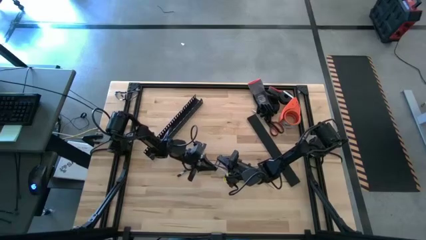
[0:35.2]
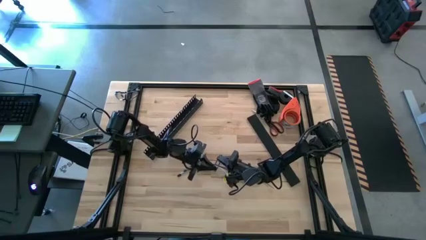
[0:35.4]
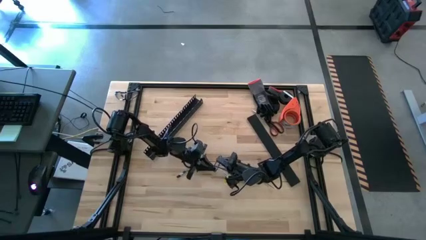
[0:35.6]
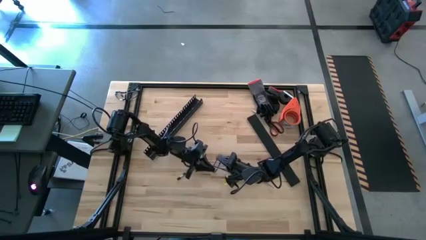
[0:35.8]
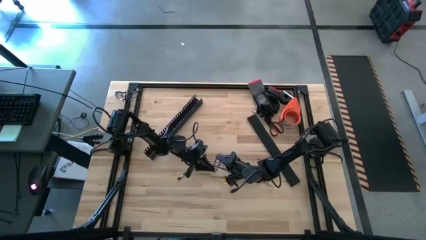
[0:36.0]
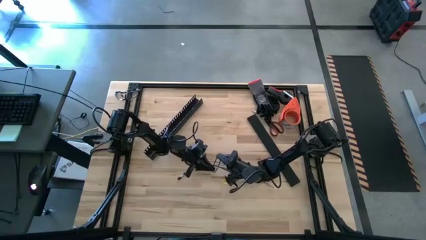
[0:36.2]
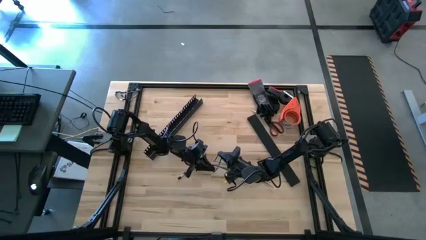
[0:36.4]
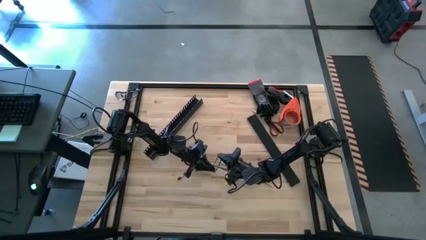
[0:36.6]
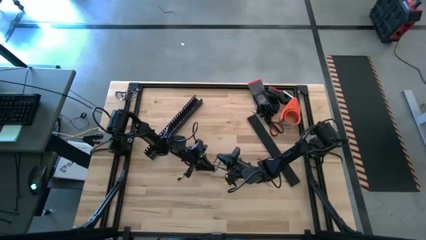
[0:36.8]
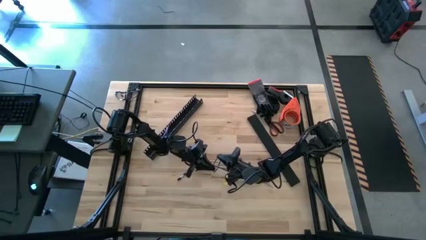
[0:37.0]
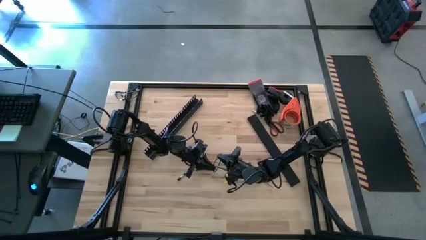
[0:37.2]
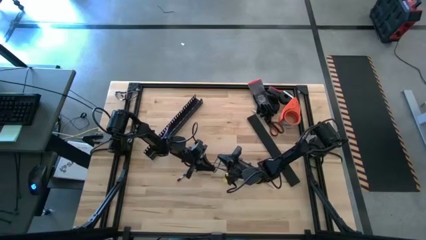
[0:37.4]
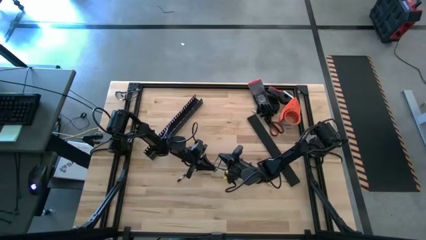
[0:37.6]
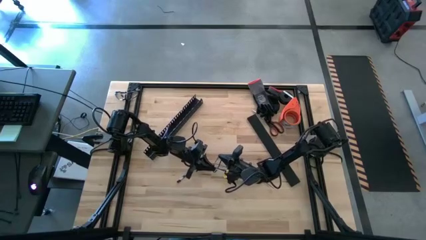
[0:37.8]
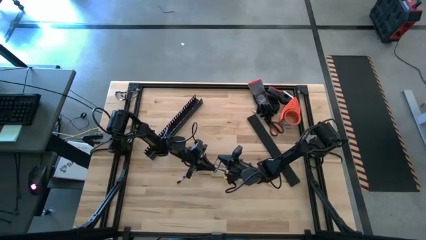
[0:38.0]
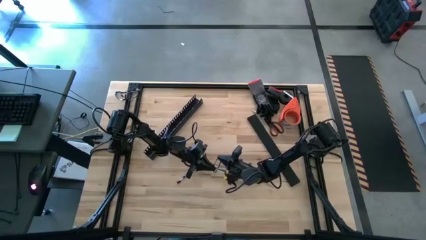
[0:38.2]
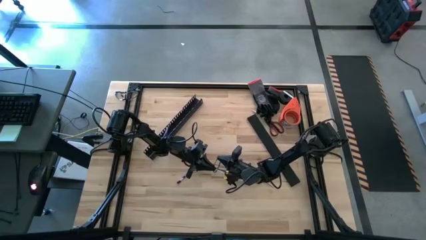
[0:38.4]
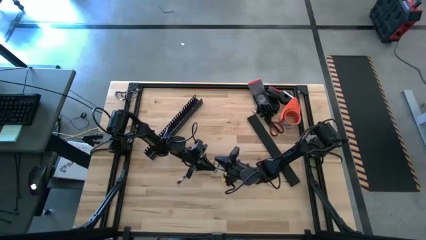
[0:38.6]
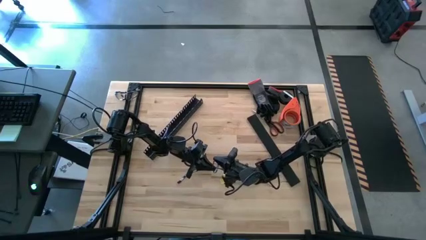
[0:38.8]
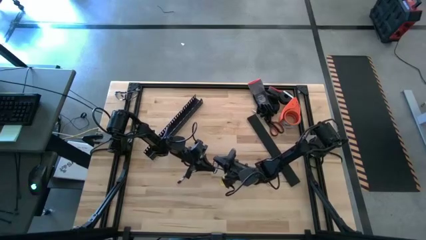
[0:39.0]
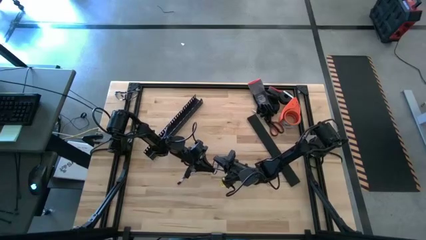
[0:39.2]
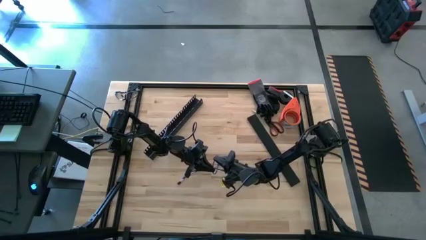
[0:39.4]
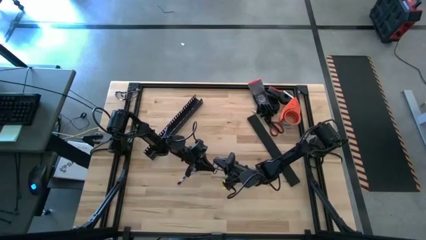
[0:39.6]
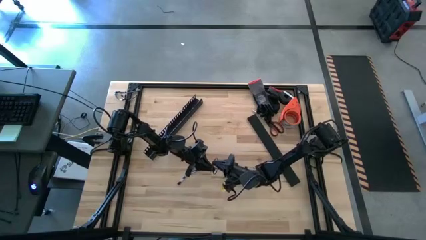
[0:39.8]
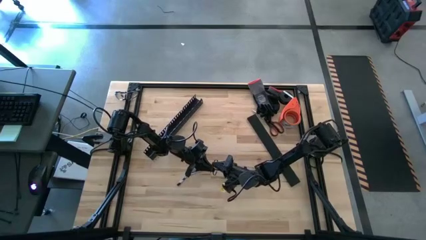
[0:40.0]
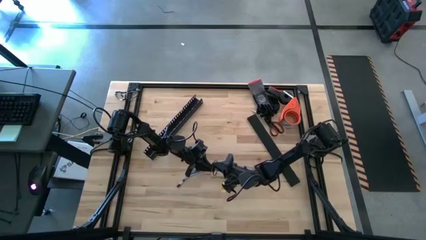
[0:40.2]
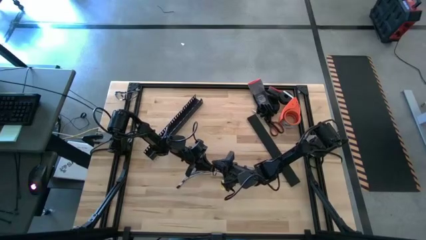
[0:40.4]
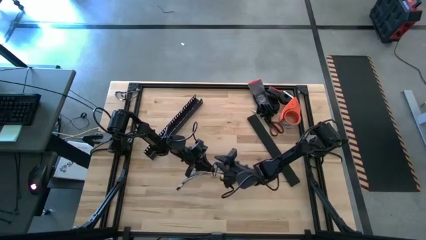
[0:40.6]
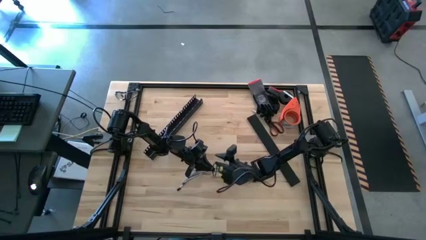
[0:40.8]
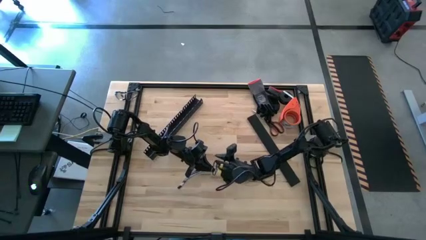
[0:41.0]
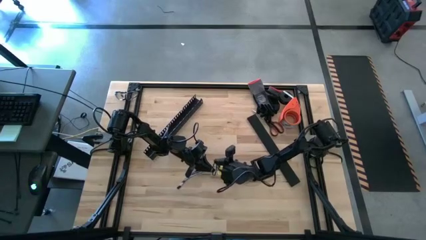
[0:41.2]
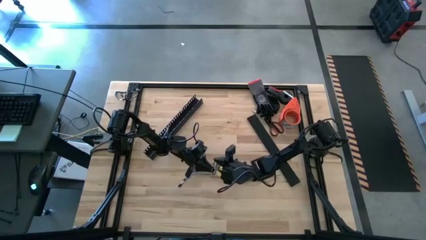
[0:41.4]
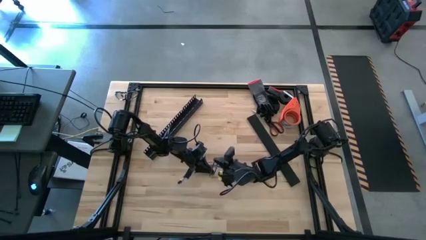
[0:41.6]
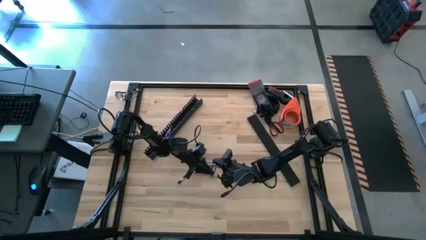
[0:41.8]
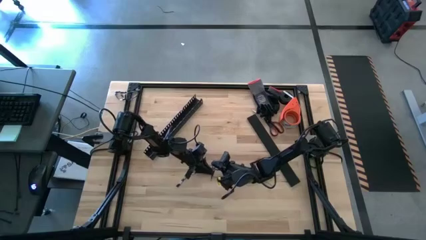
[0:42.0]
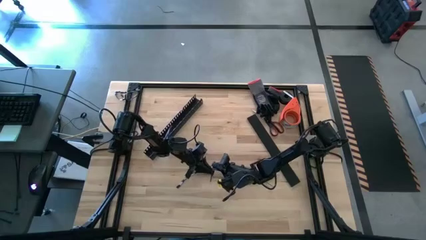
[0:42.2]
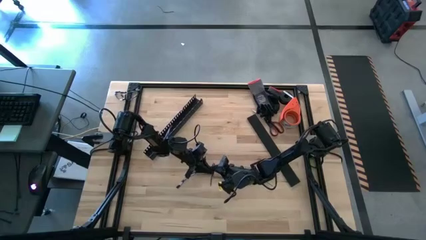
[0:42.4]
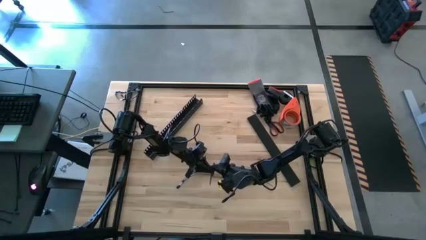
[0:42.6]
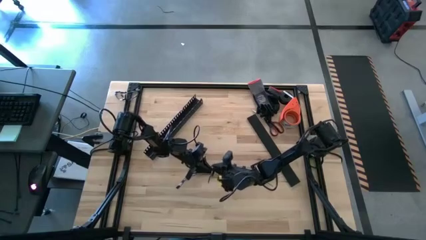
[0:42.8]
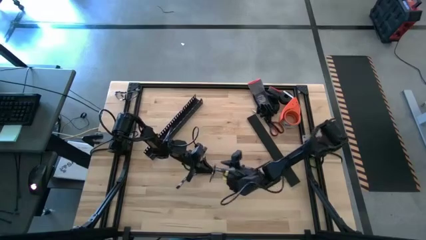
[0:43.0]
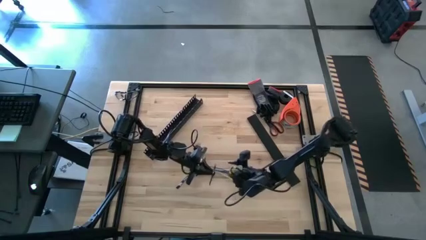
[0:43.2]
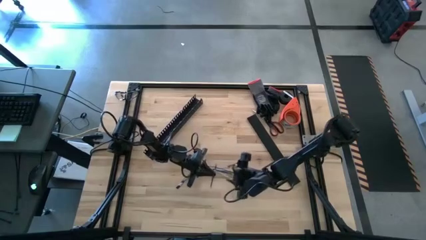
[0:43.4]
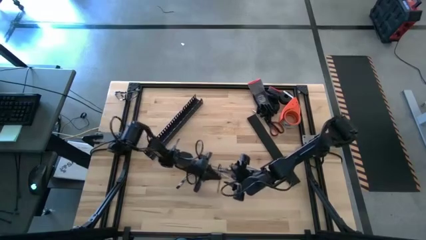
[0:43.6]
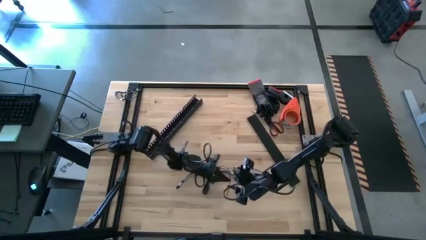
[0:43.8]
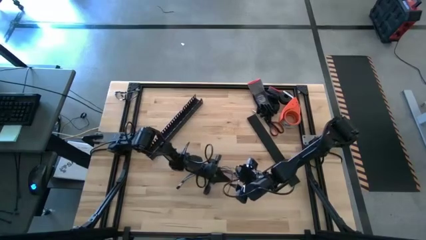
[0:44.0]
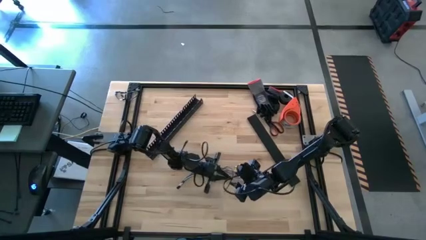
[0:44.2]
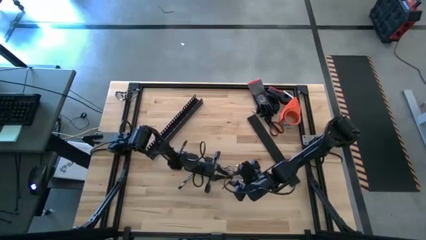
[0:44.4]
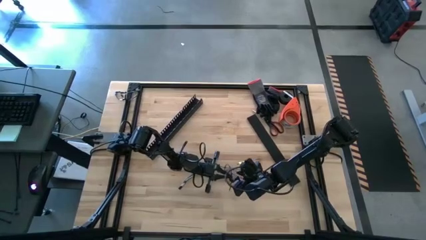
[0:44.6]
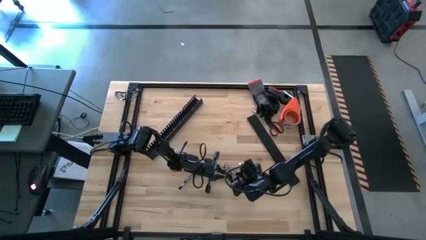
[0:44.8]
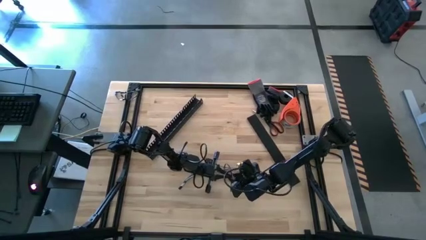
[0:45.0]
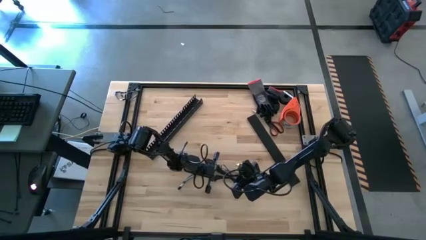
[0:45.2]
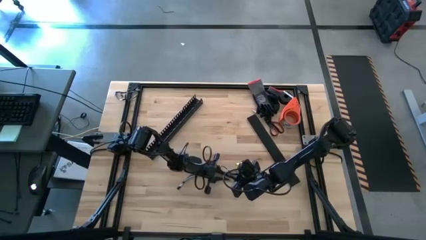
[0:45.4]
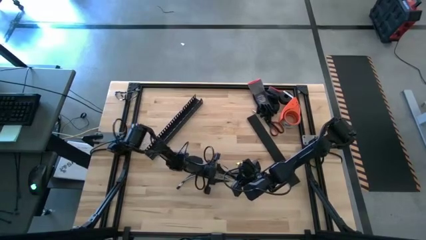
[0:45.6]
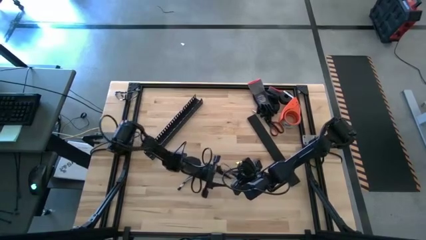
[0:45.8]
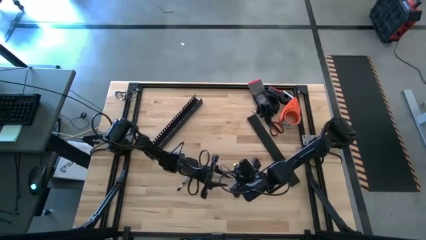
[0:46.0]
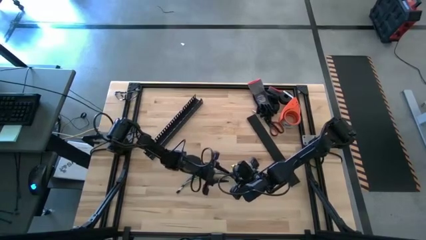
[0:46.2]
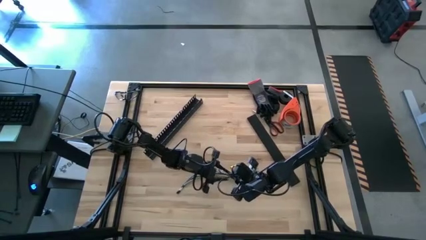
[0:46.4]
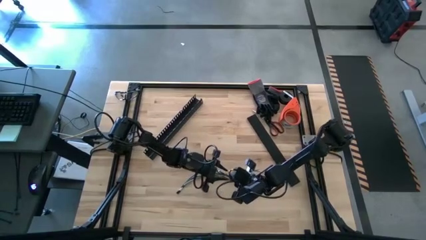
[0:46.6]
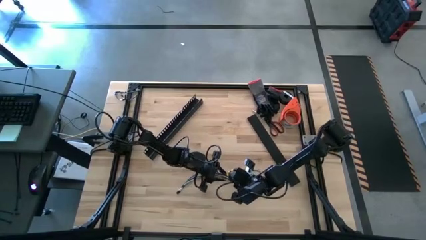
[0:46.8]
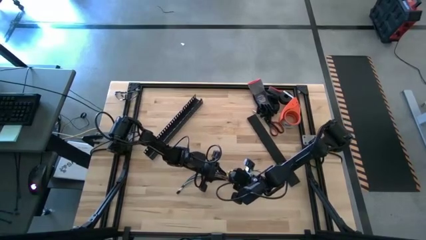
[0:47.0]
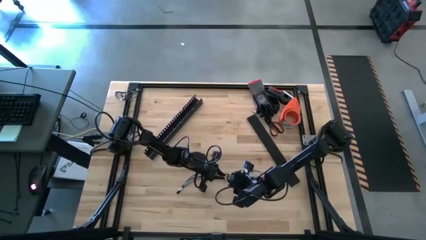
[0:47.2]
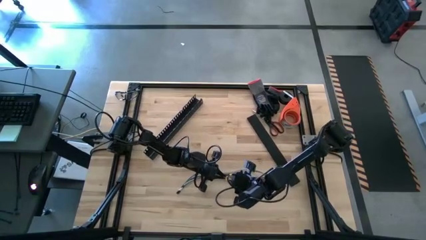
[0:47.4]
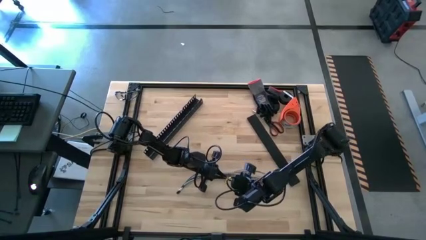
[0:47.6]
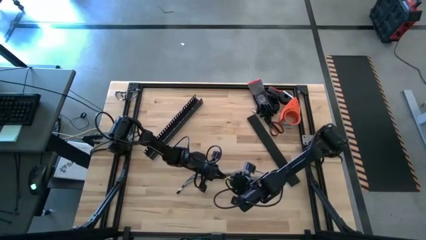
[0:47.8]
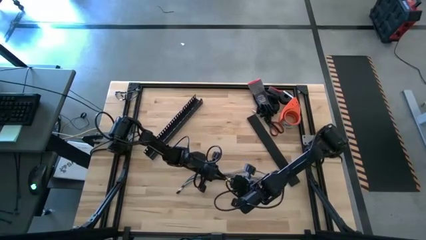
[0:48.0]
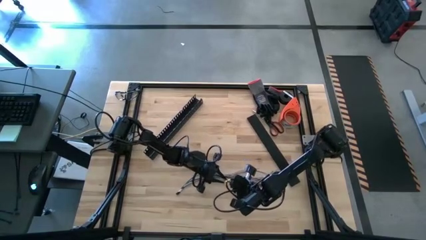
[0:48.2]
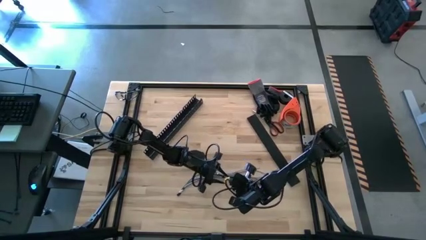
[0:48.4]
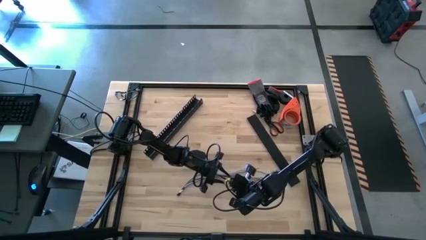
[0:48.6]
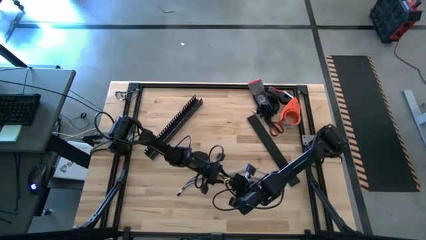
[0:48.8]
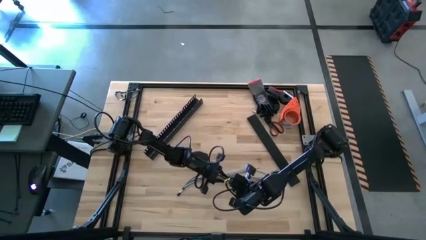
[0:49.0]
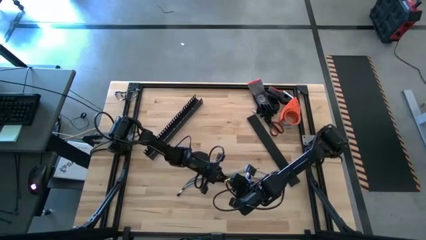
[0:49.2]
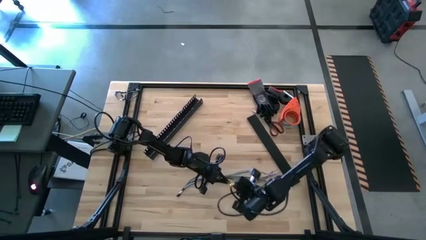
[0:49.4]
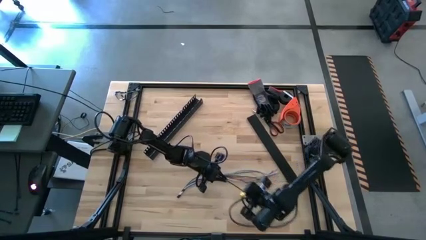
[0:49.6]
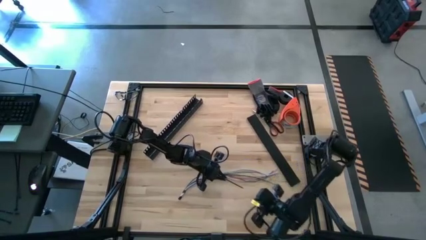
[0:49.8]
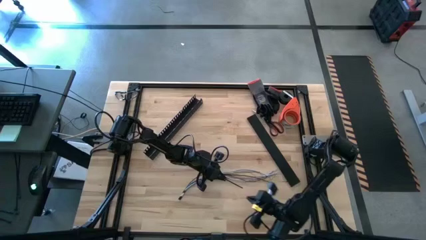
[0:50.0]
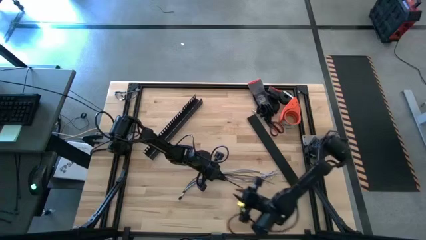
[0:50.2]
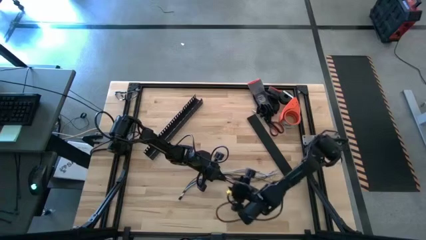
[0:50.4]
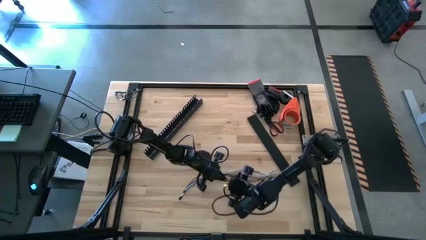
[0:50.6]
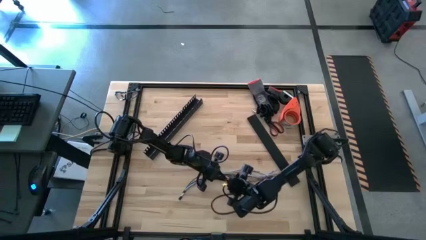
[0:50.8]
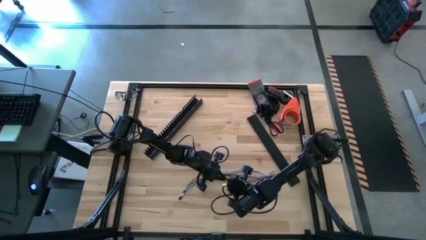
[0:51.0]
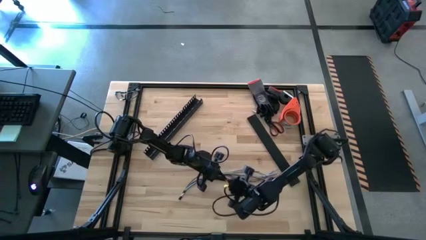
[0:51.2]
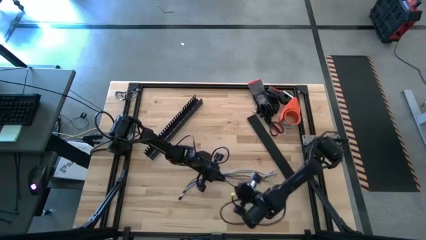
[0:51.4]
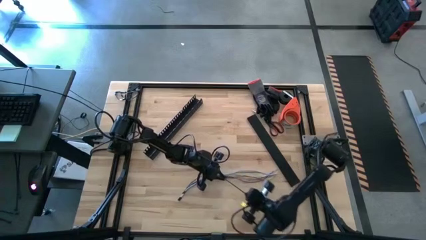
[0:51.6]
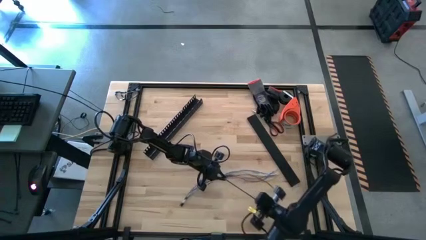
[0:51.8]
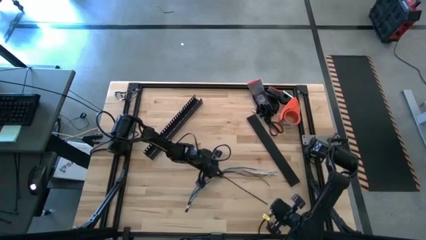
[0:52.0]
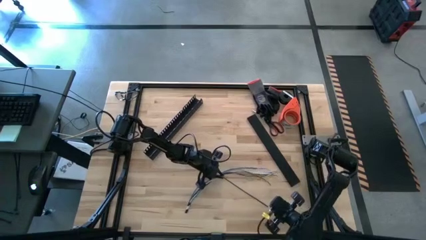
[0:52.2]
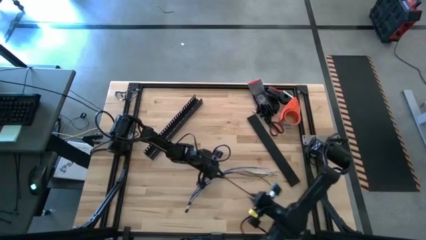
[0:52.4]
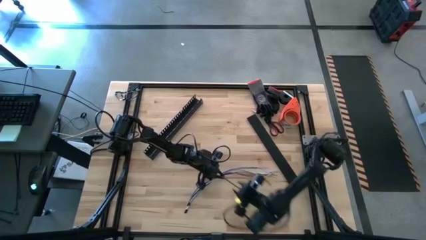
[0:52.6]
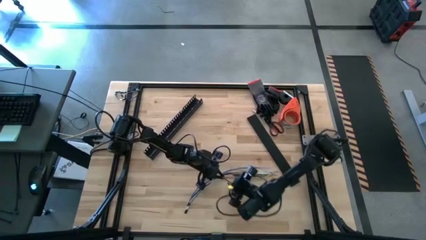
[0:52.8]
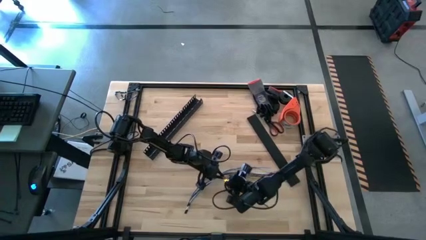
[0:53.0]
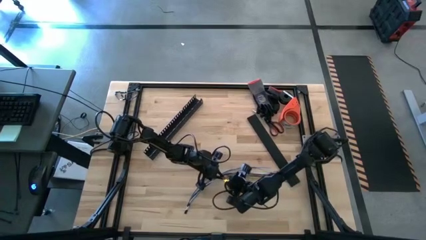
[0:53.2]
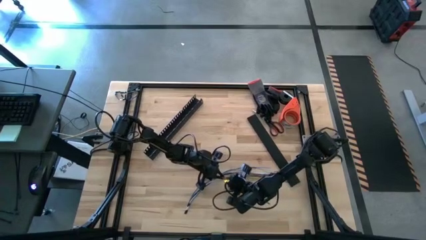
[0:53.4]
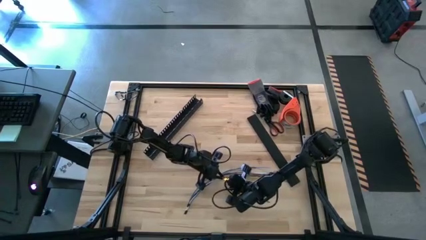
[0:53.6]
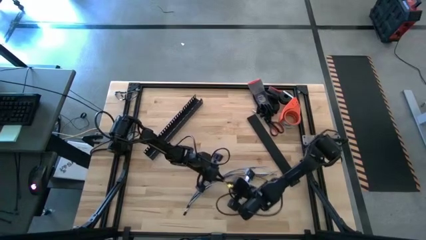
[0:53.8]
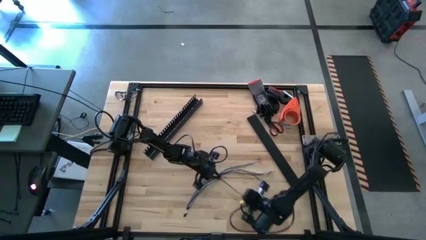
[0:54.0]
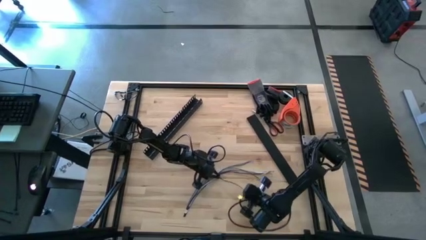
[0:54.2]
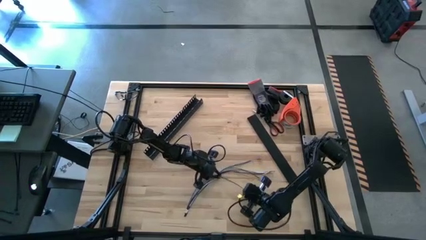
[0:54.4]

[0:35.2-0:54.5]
Task: Ziptie cables
Wrap the cables with a black zip tie
